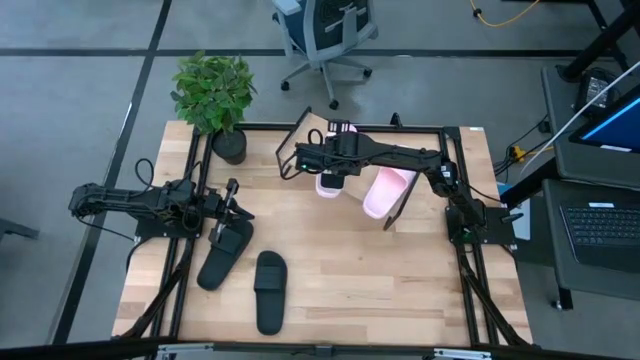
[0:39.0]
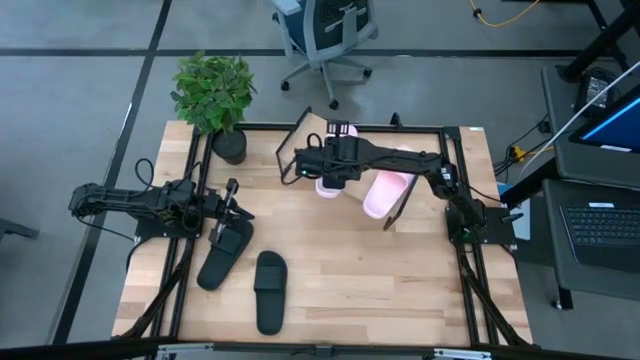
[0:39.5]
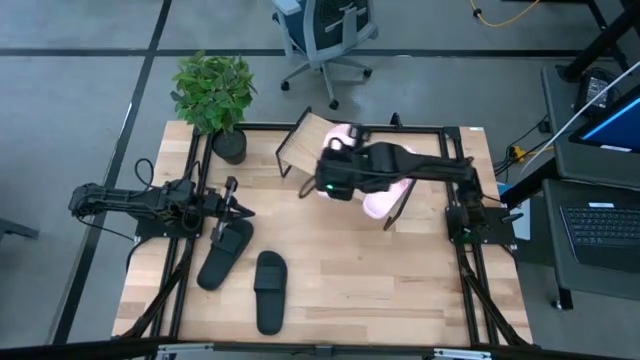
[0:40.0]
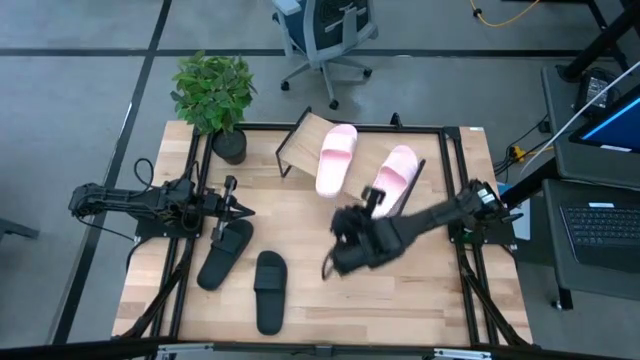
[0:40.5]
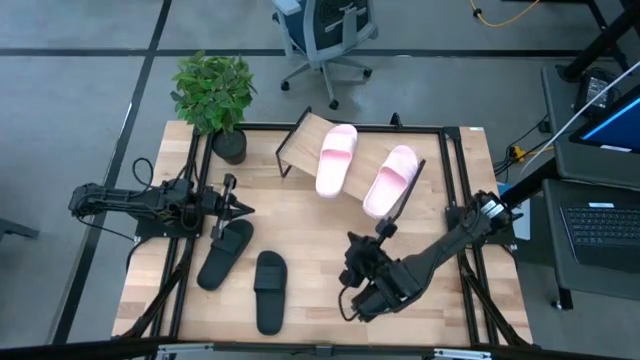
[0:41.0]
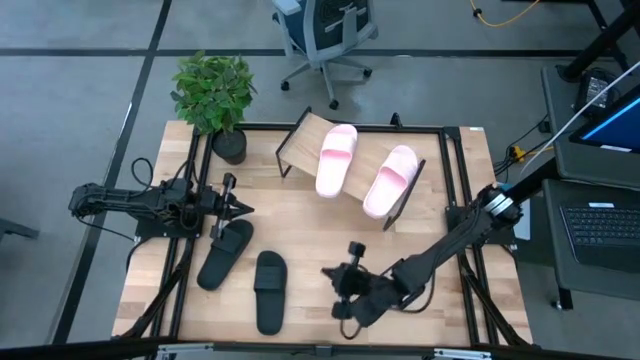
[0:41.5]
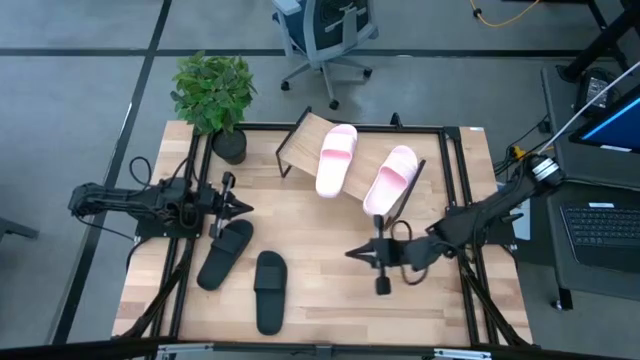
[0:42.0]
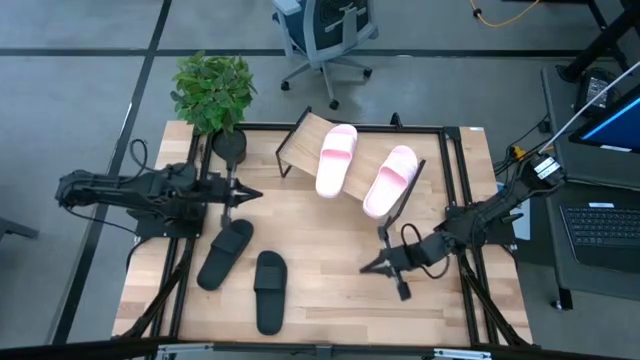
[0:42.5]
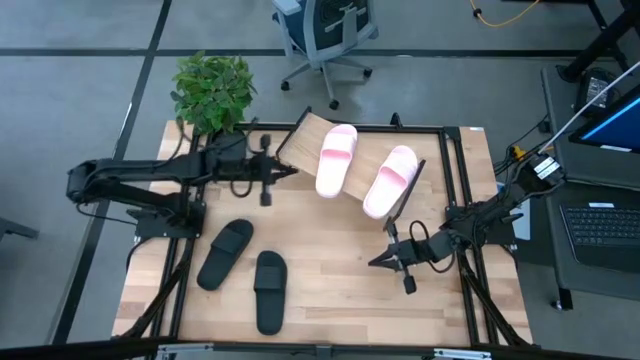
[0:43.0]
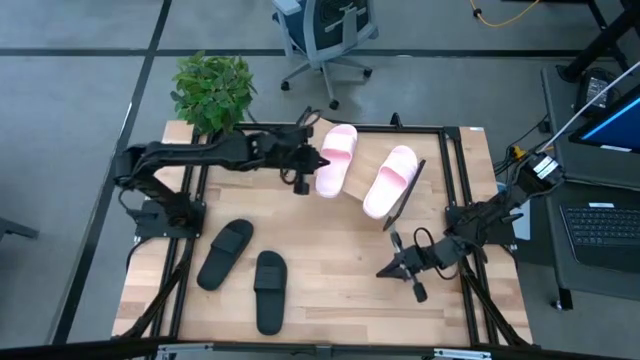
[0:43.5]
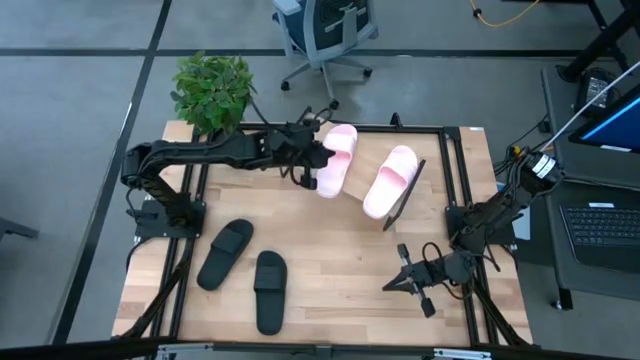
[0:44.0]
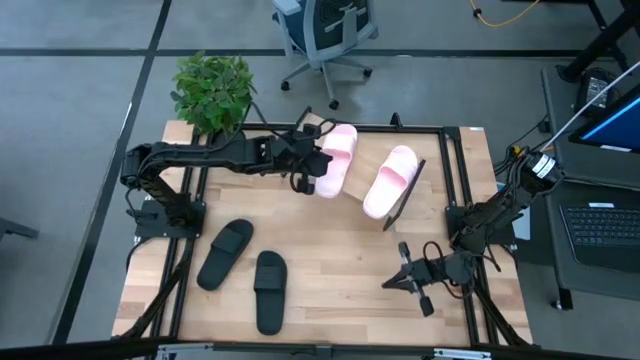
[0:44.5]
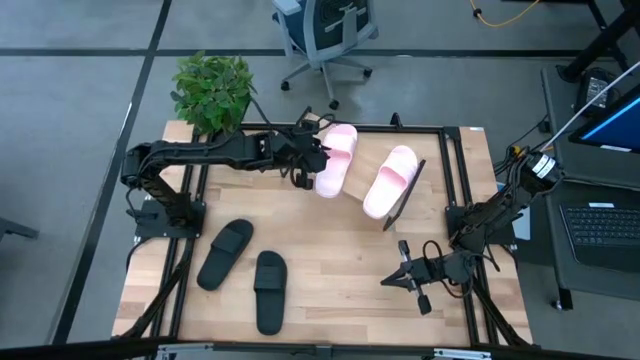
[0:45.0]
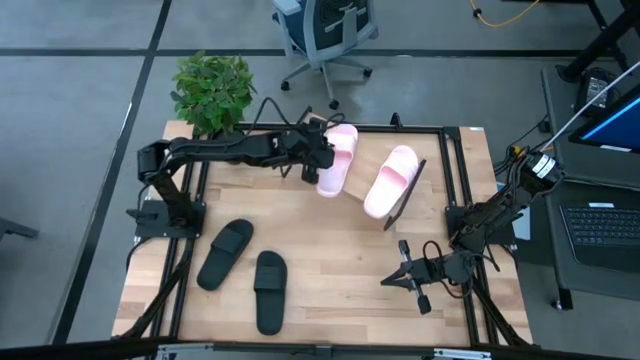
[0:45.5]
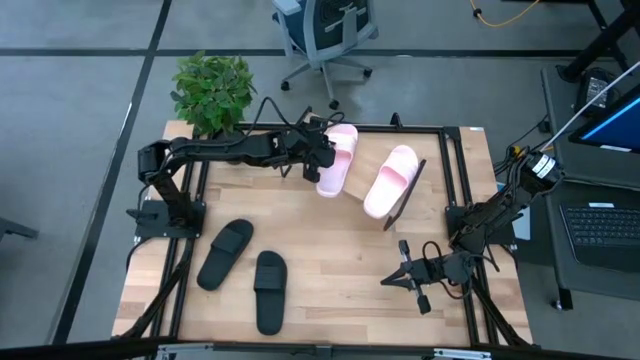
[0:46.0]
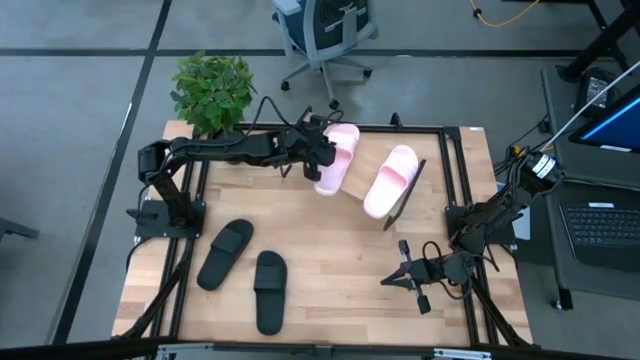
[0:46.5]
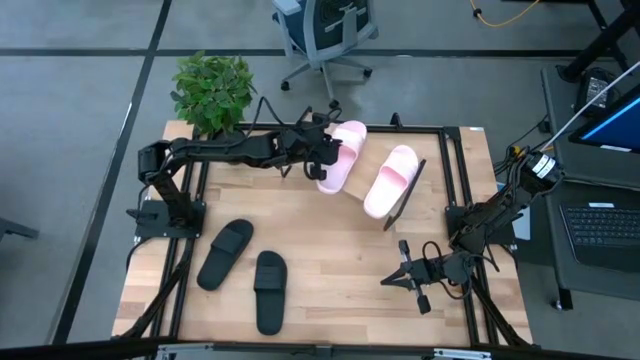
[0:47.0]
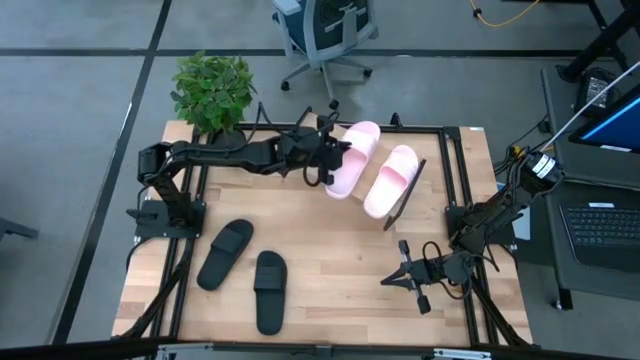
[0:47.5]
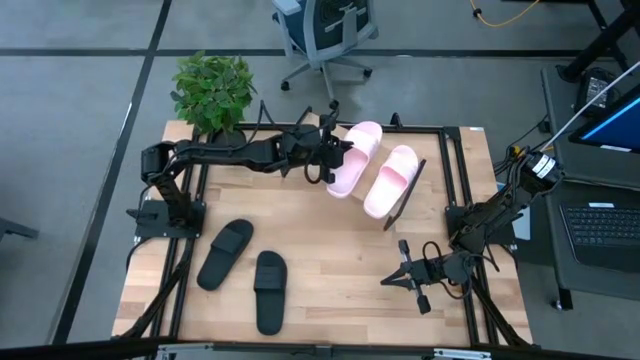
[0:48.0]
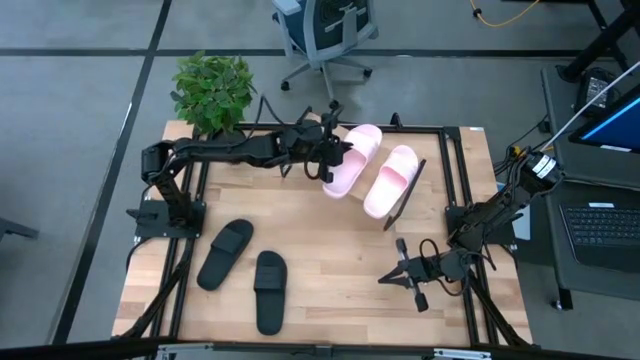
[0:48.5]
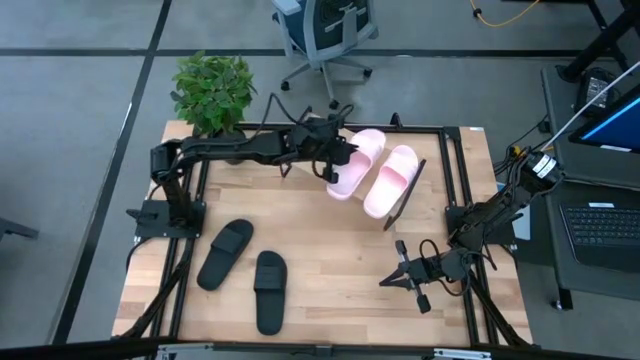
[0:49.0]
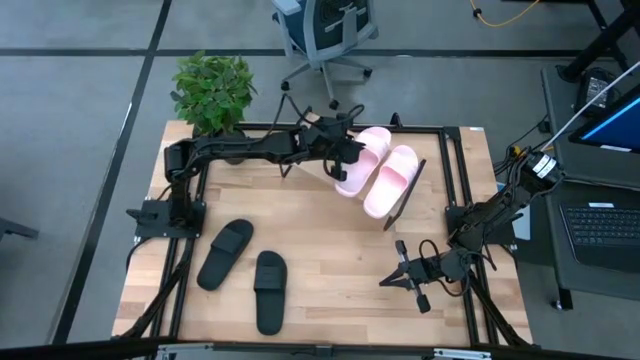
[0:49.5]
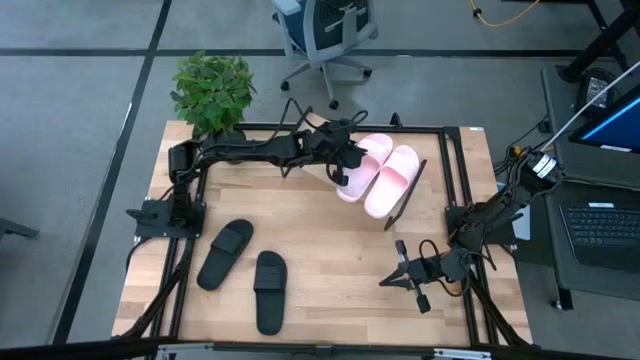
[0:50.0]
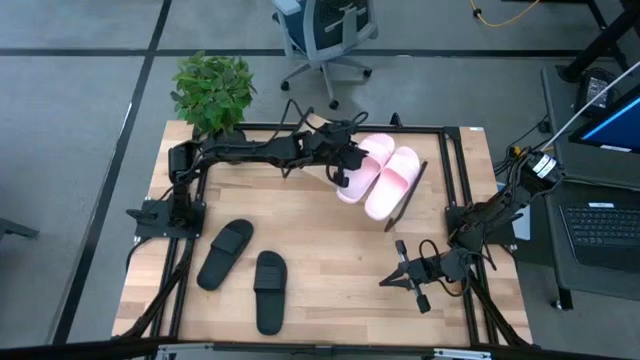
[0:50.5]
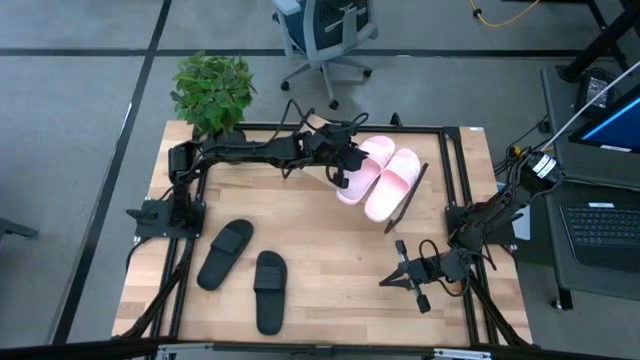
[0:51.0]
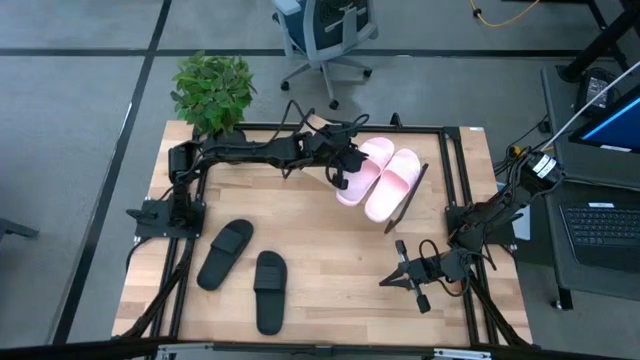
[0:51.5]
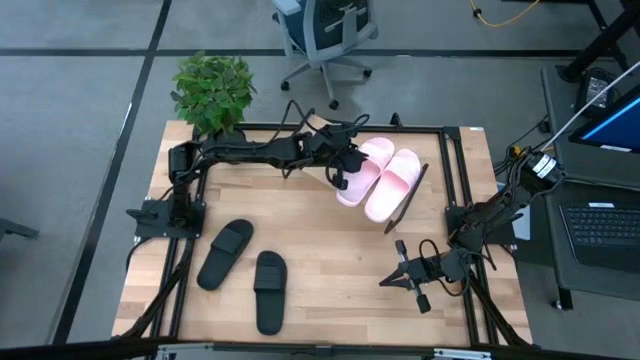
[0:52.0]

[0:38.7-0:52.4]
Task: Pick and place slides into the shelf
Put the pink slide on the shelf

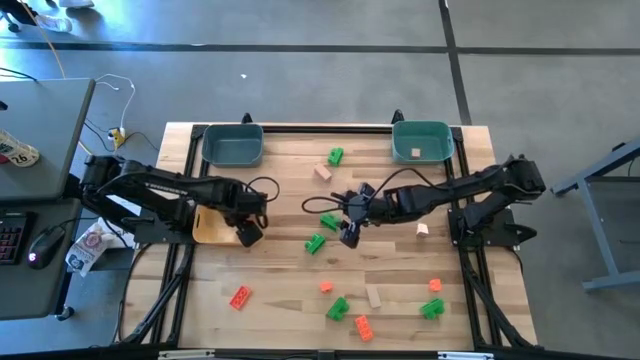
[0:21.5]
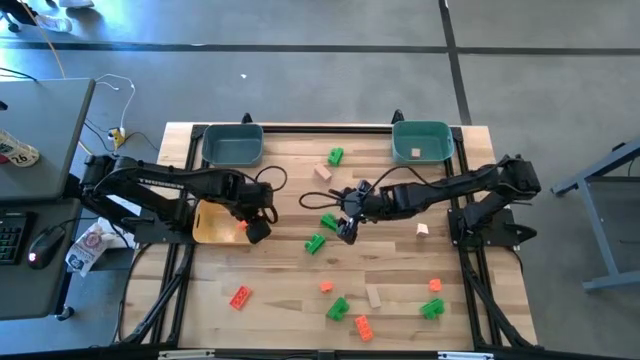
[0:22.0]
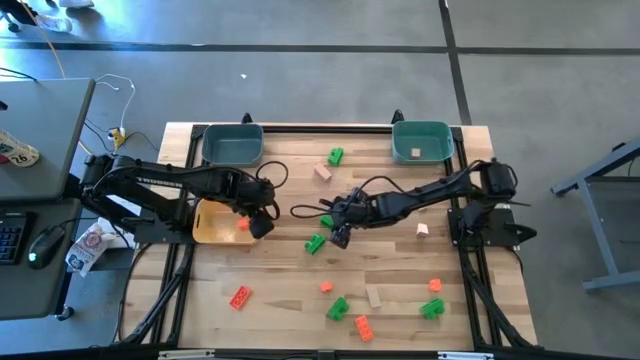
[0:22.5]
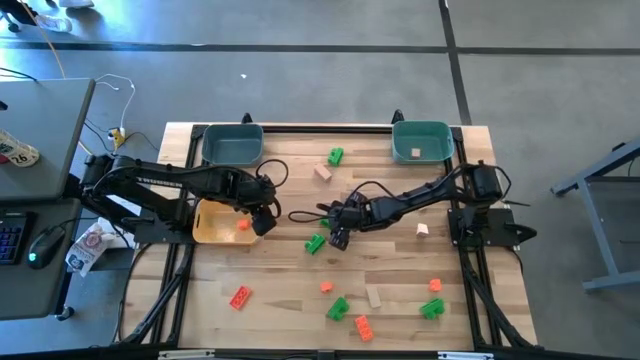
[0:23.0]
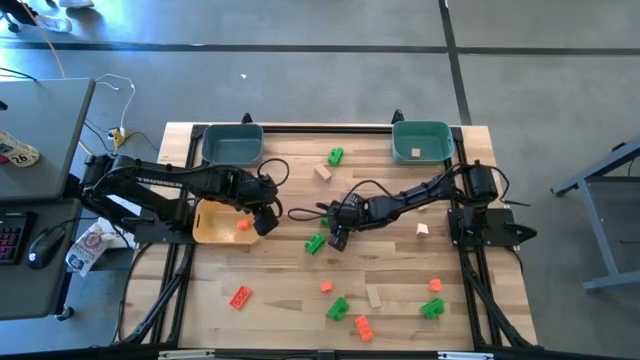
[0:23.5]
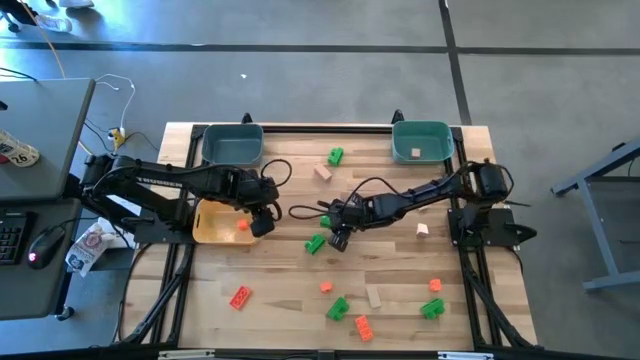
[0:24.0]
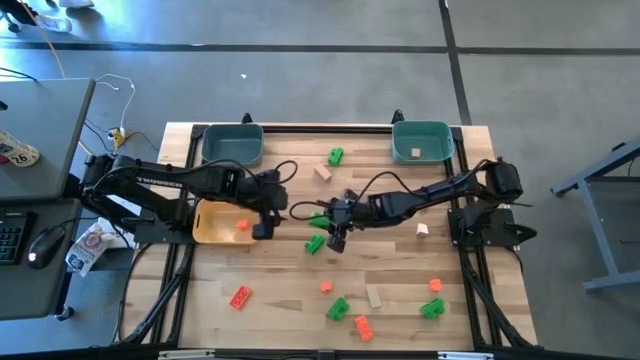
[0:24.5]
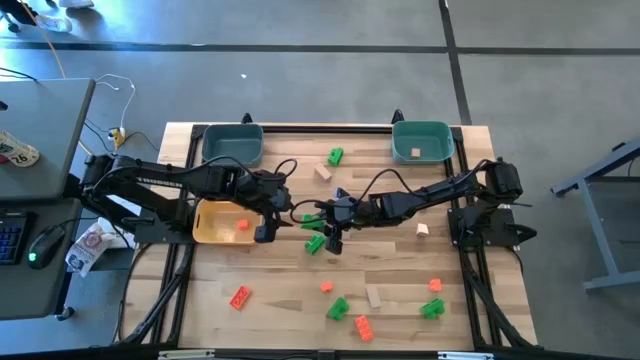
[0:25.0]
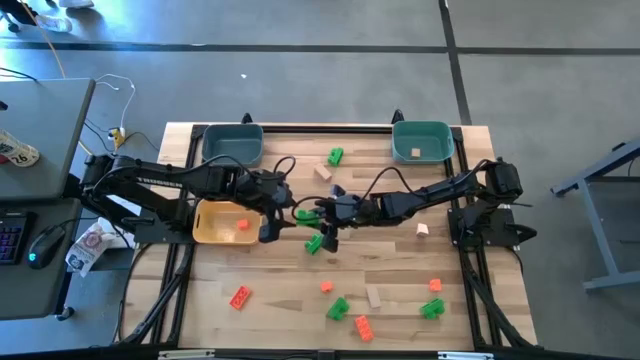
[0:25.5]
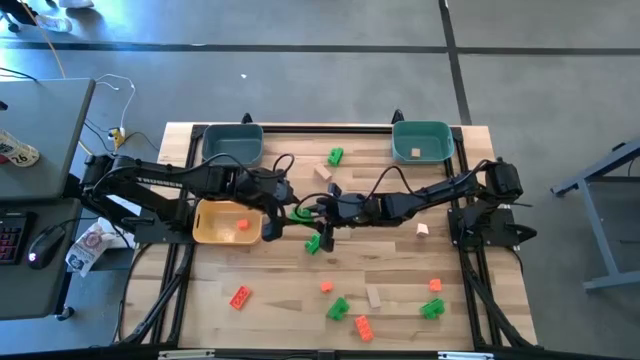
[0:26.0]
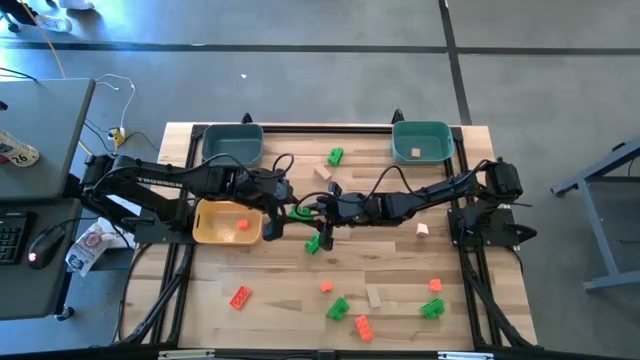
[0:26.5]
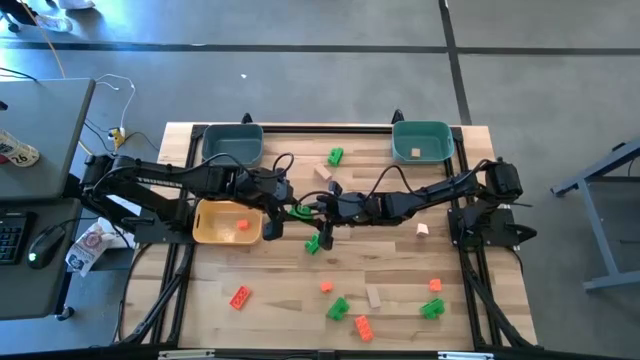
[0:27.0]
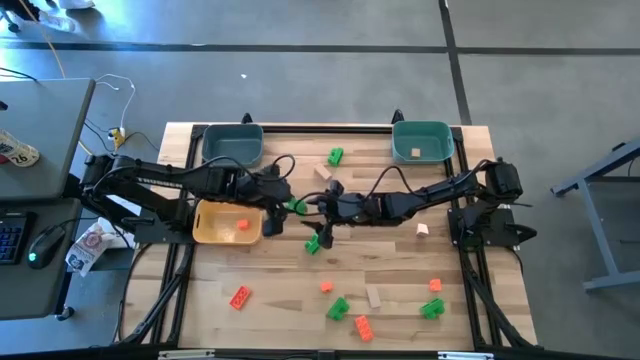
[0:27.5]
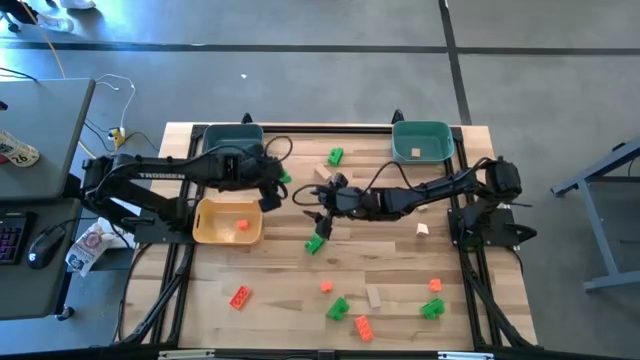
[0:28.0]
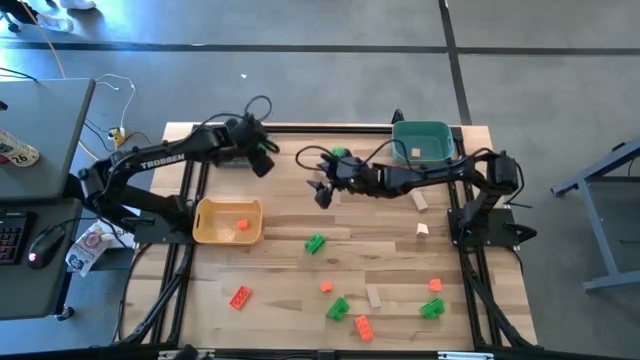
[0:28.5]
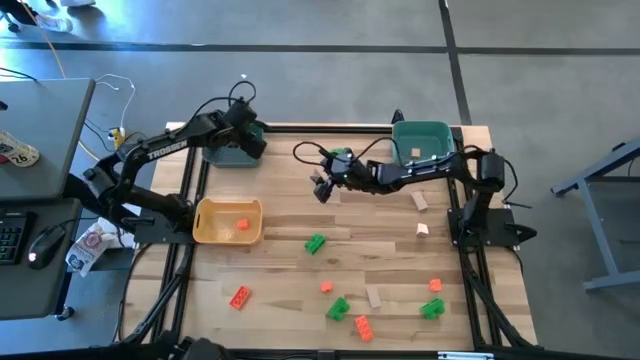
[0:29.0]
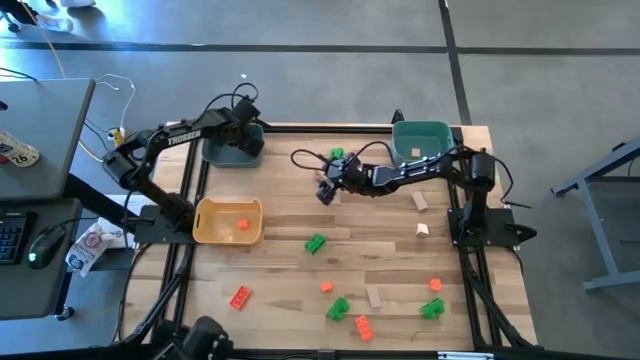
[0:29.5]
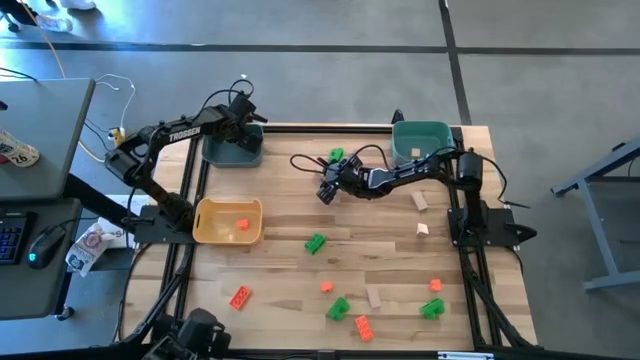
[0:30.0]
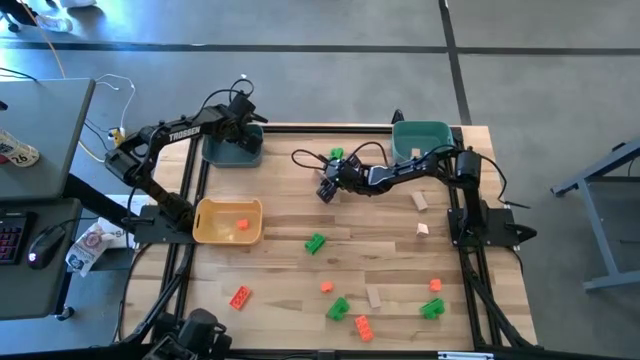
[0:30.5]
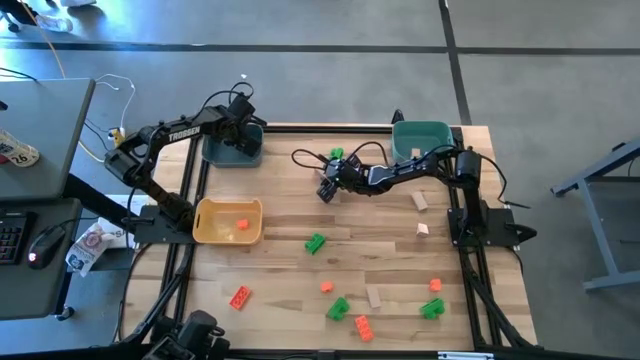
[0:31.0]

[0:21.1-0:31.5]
Task: Sort & place blocks by color
Put the green game piece into the blue bin
